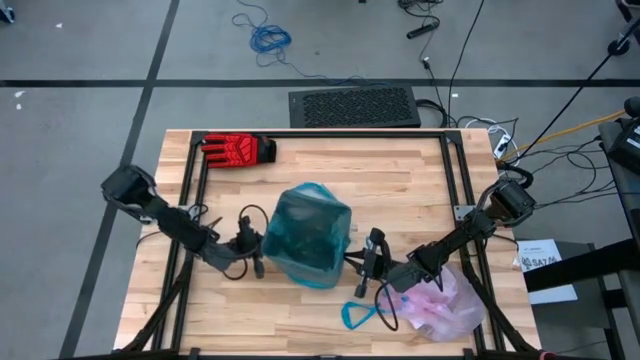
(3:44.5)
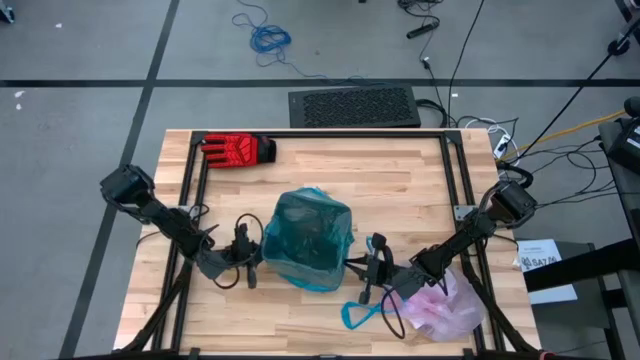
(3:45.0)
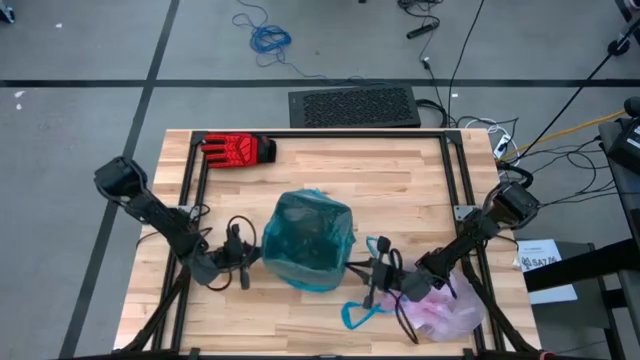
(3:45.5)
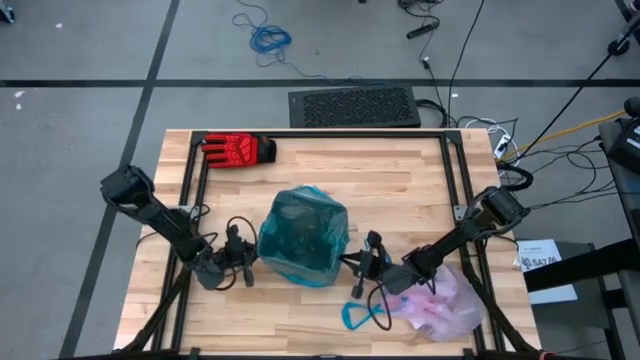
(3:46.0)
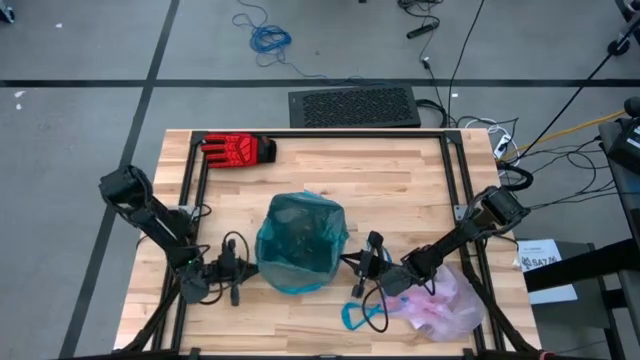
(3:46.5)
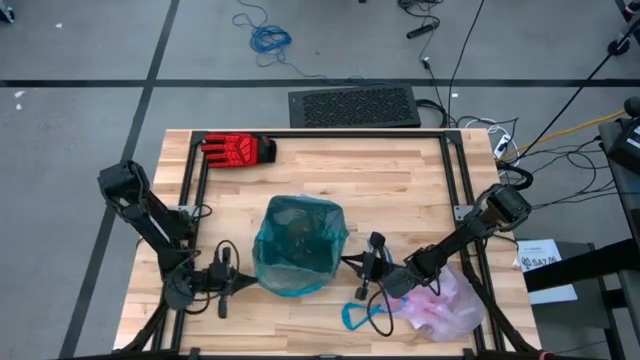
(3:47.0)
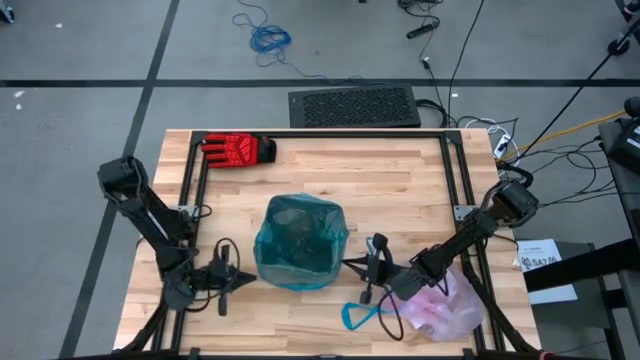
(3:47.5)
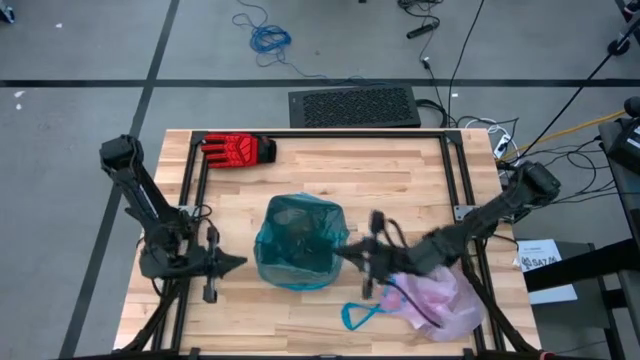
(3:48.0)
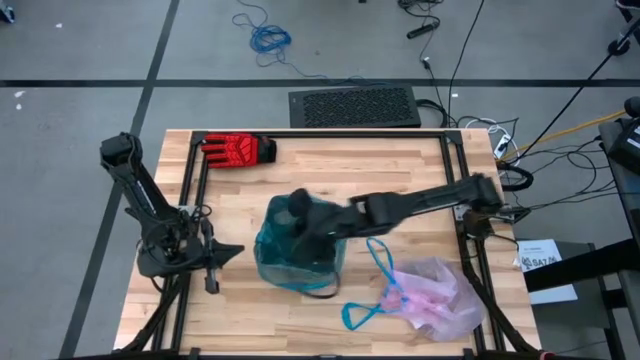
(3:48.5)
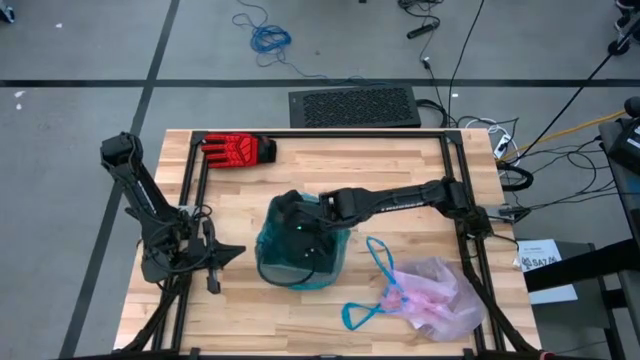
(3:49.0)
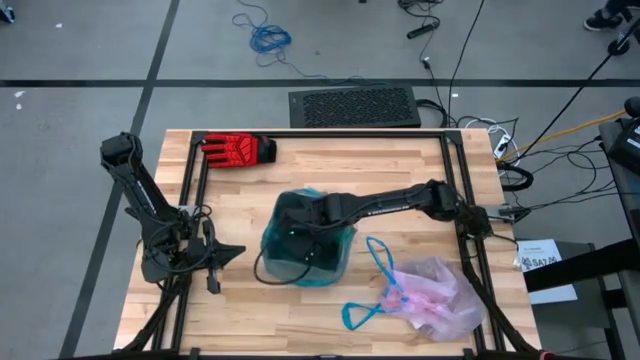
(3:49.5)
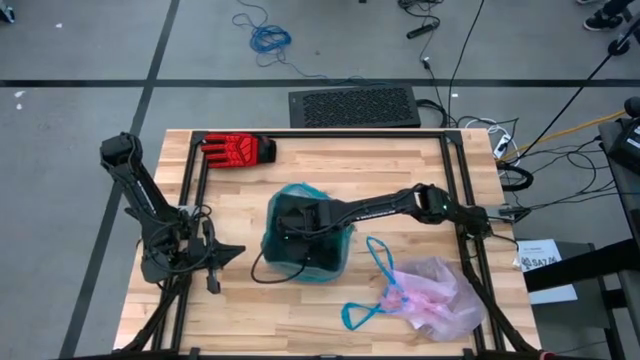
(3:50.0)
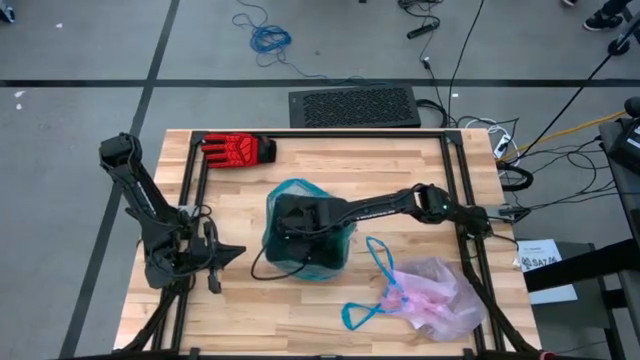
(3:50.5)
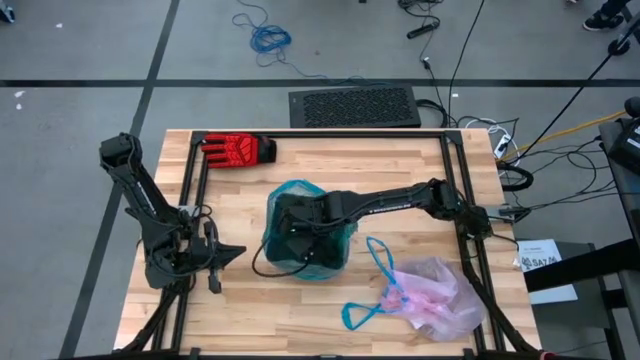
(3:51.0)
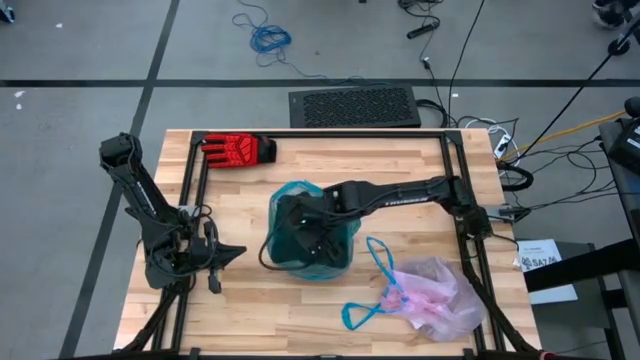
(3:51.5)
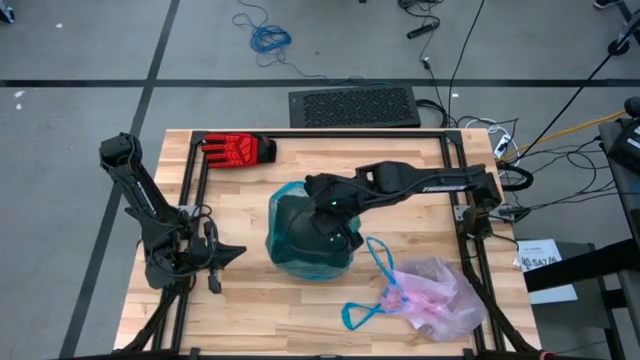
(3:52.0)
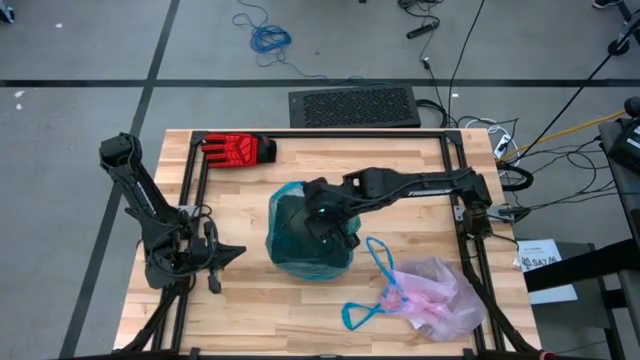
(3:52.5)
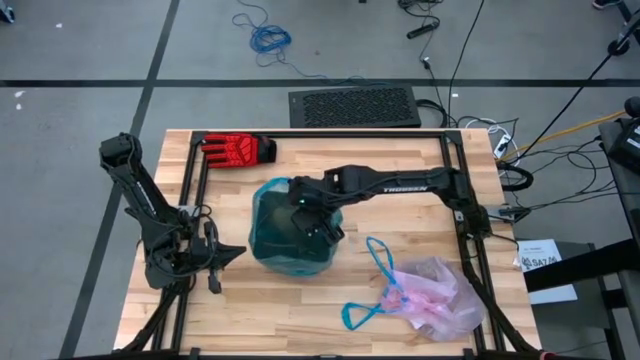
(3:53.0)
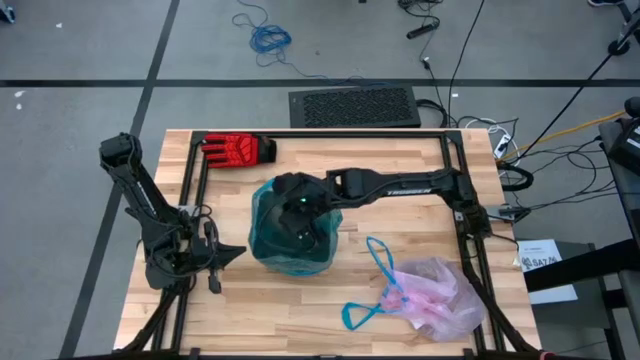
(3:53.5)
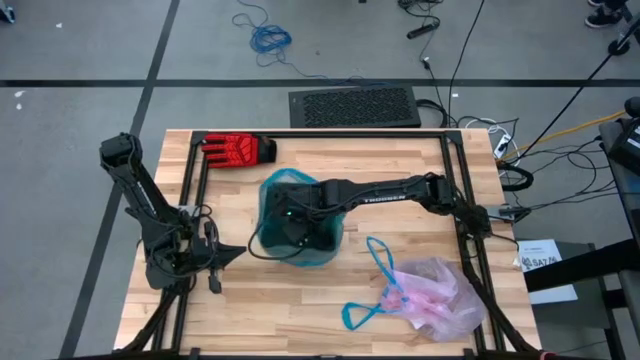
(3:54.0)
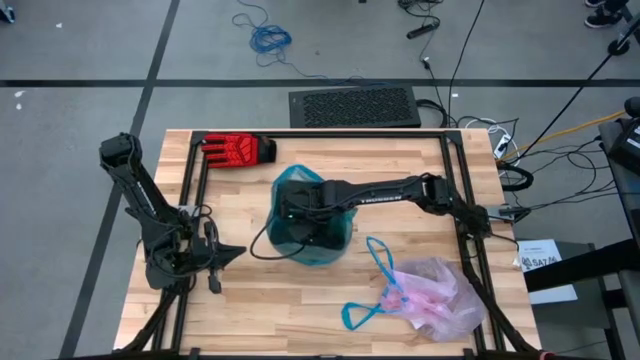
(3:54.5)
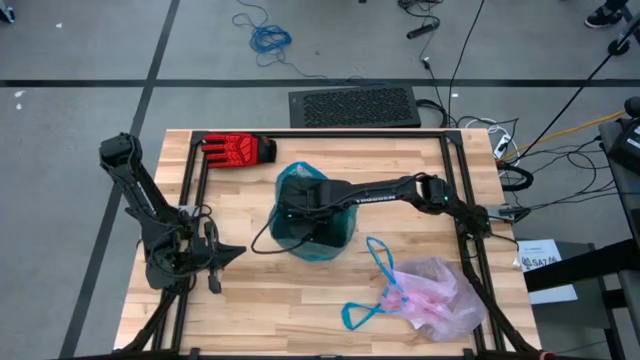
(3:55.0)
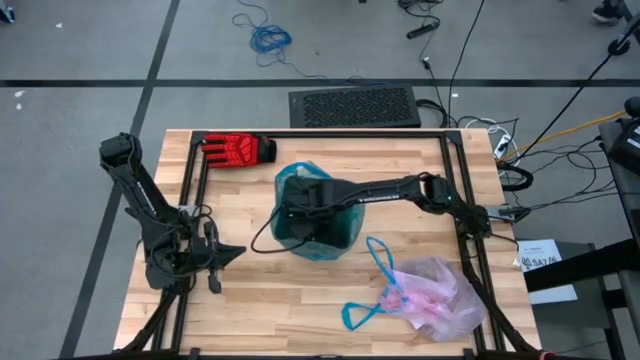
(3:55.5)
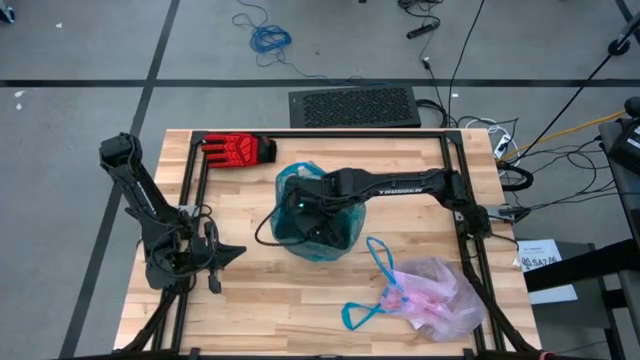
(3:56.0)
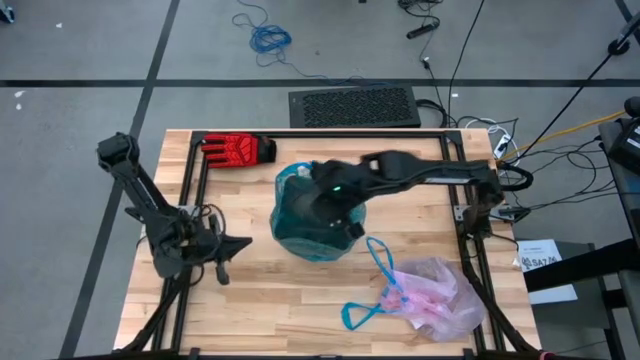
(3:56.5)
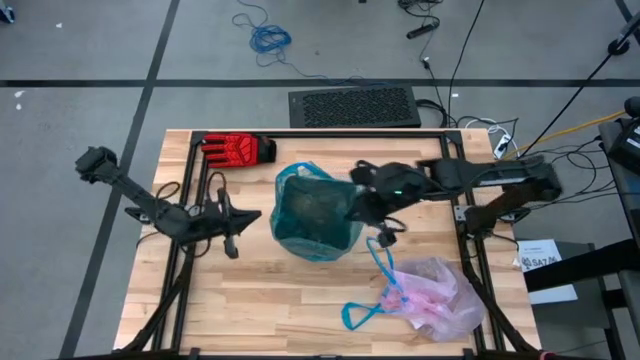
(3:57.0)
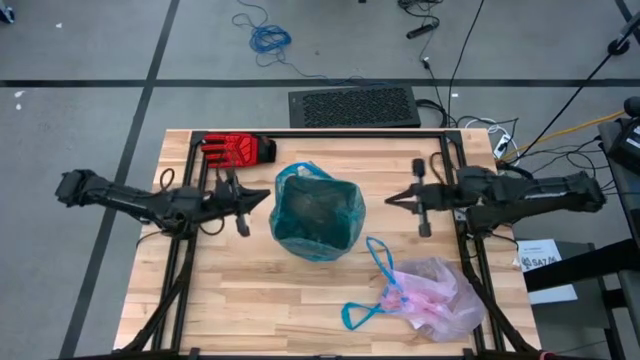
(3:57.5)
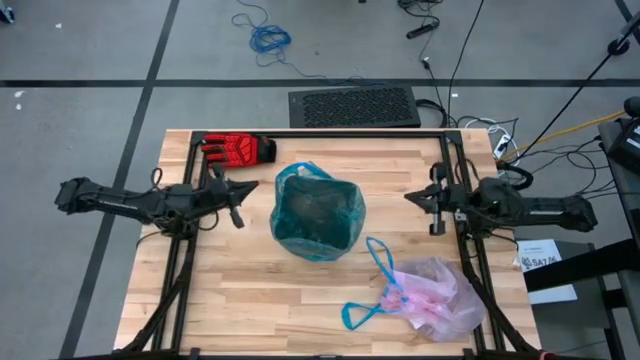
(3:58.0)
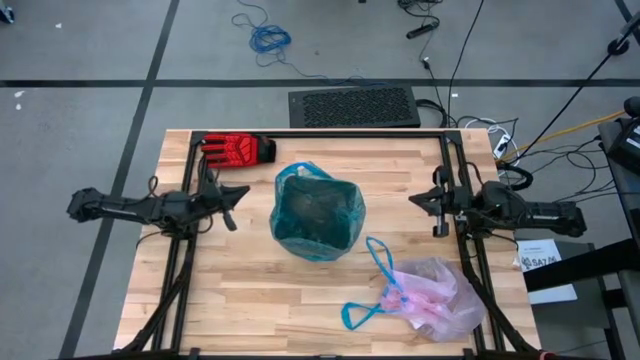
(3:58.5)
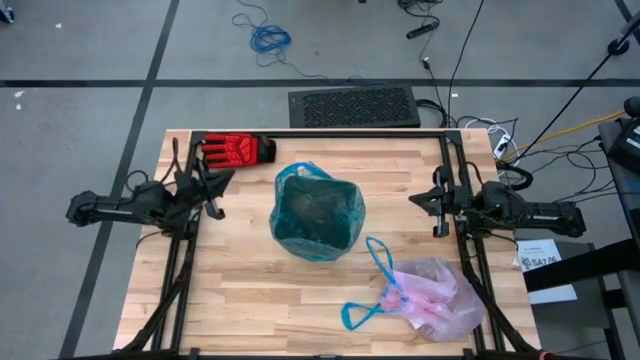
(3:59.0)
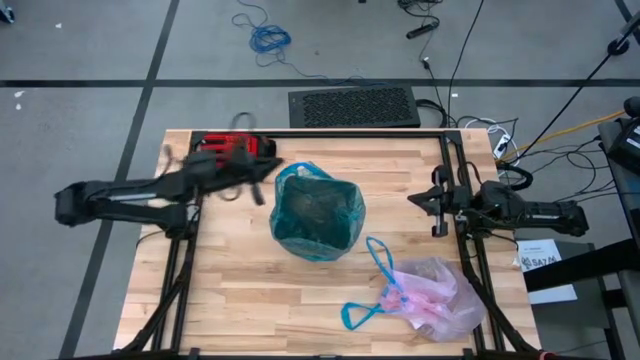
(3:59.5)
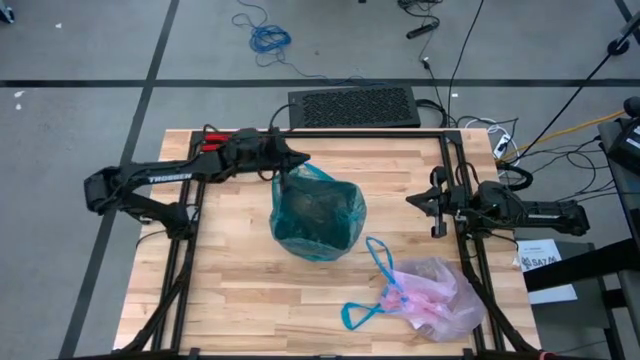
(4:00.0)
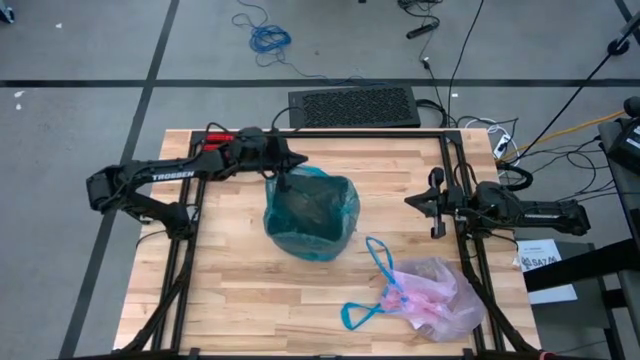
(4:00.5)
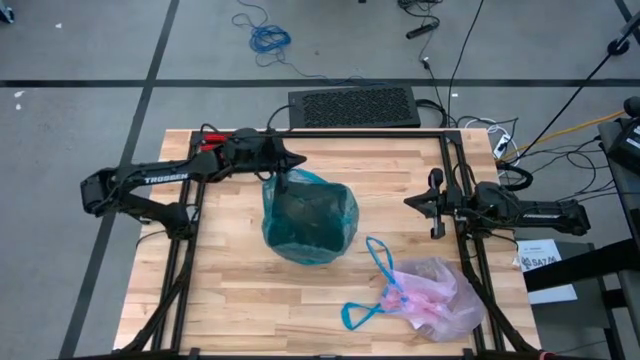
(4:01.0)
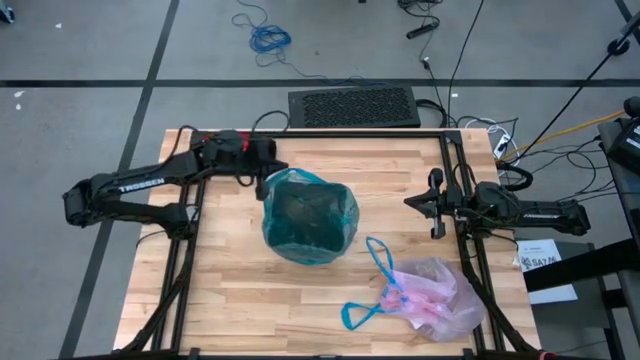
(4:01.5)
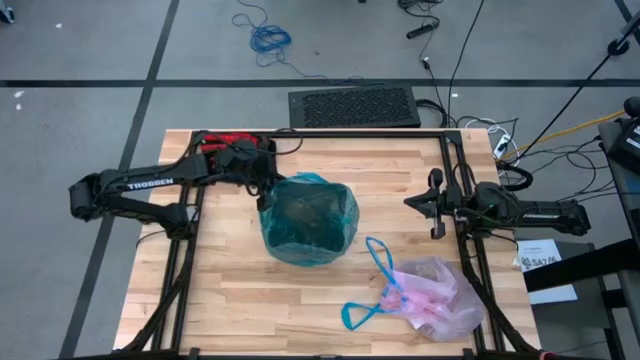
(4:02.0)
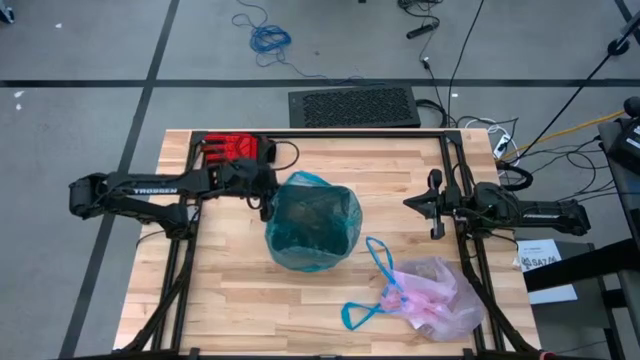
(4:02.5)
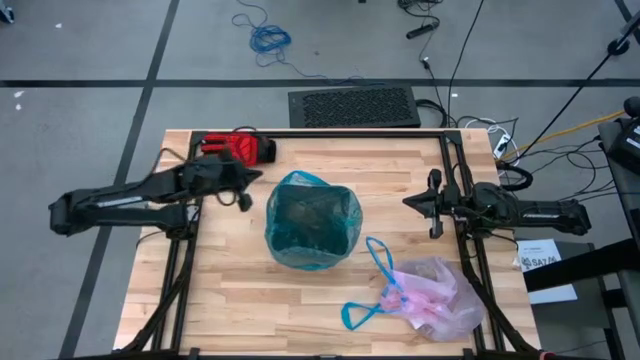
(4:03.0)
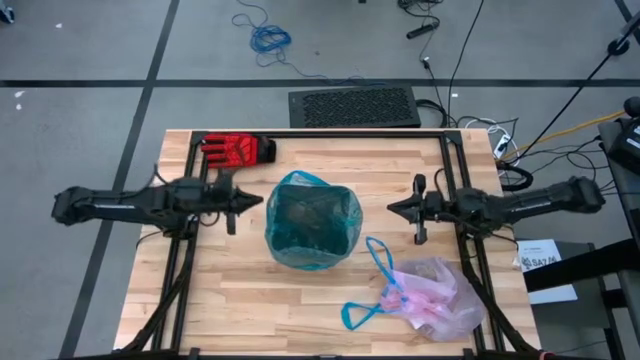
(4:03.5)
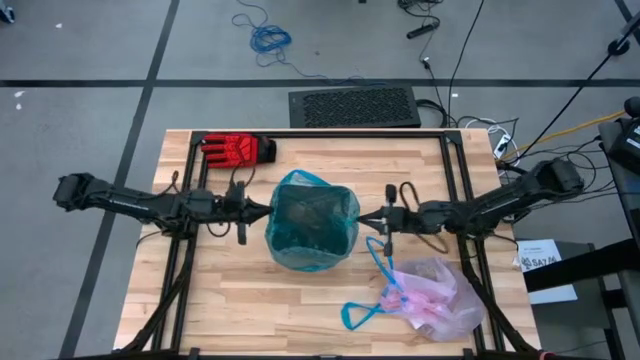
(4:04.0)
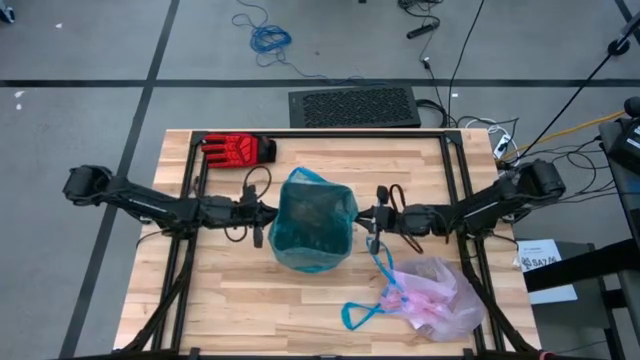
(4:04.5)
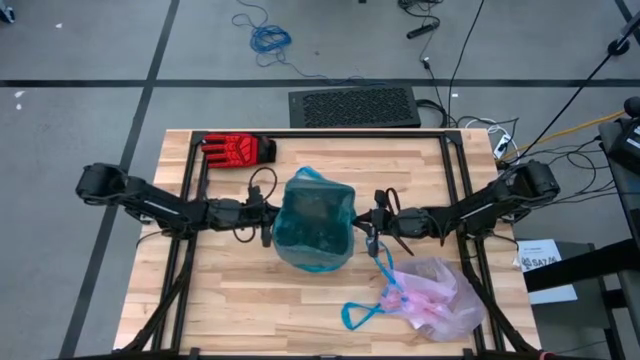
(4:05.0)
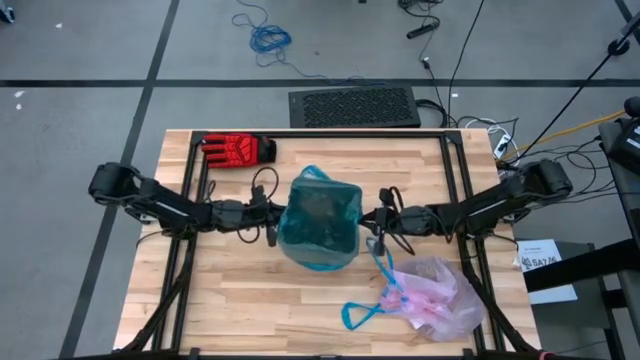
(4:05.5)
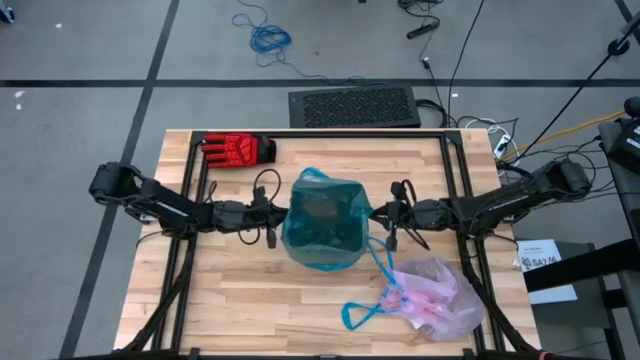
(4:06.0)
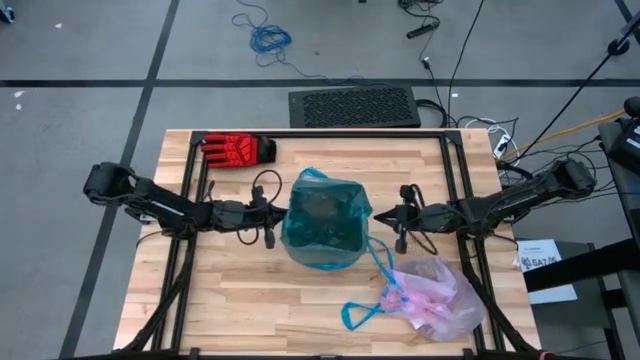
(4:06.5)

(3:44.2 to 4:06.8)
Task: place trash/remove bag and relplace
Insert the blue trash bag into the black trash bin
